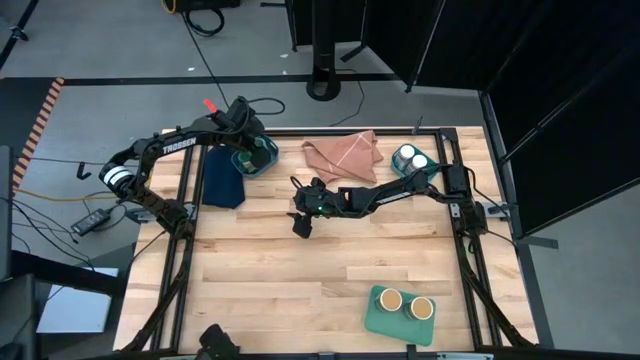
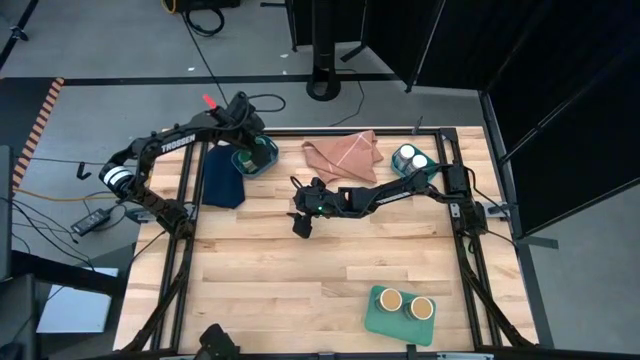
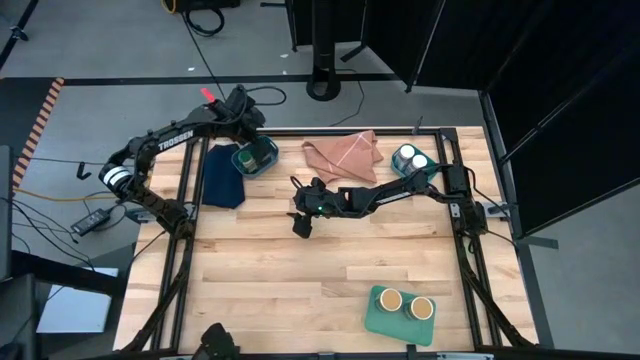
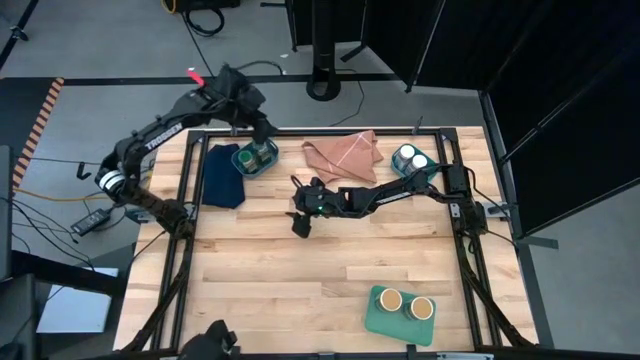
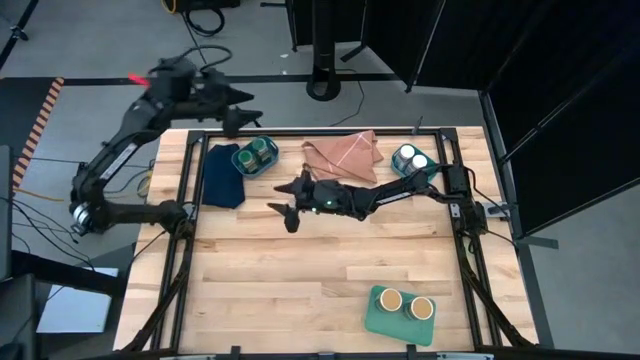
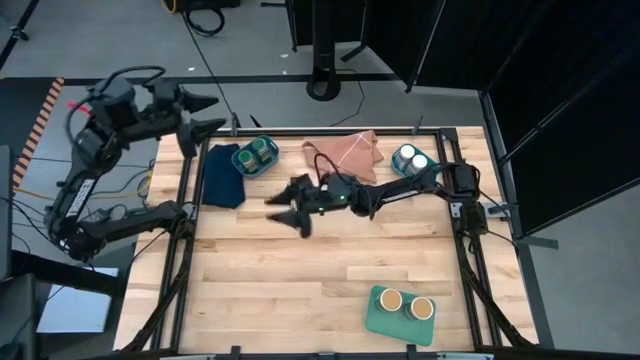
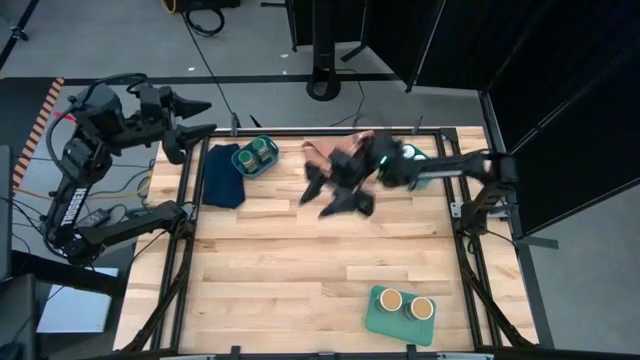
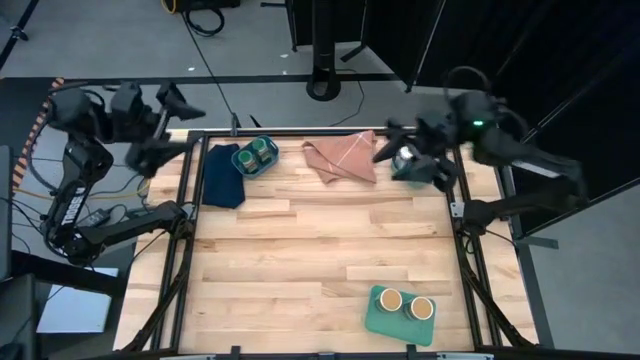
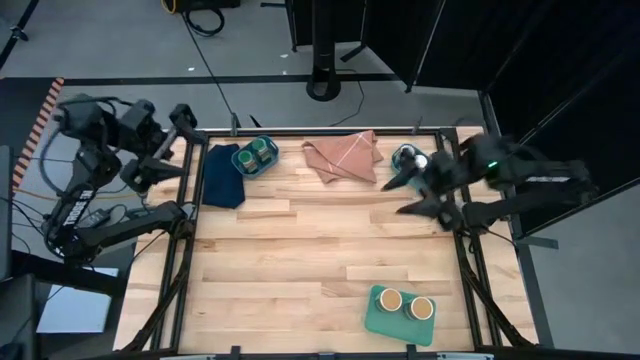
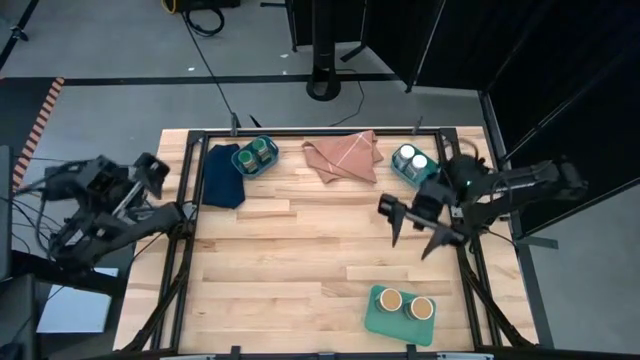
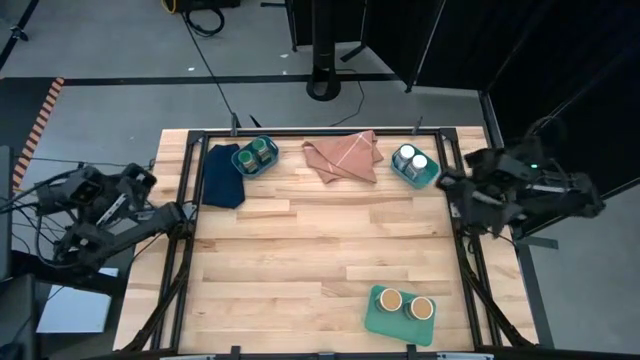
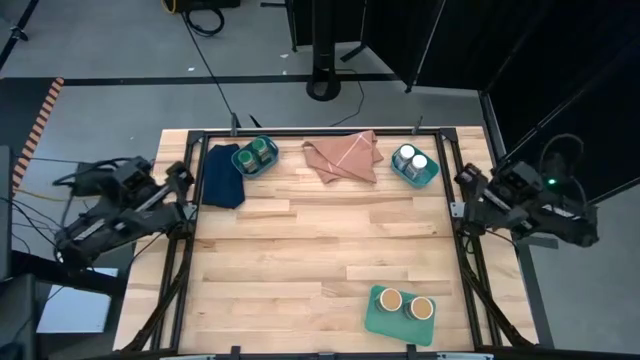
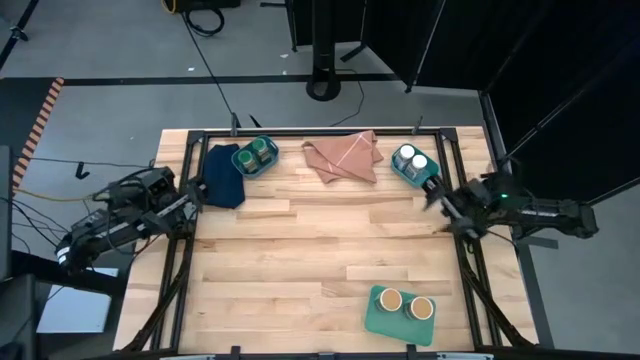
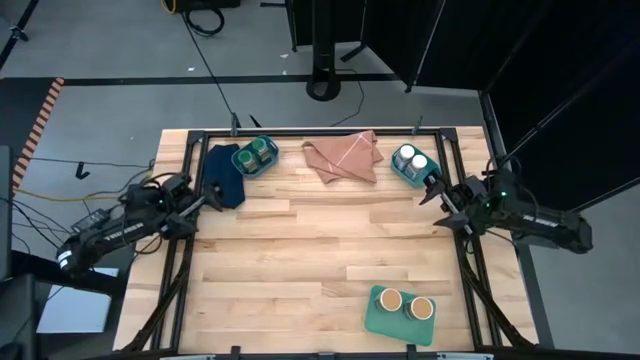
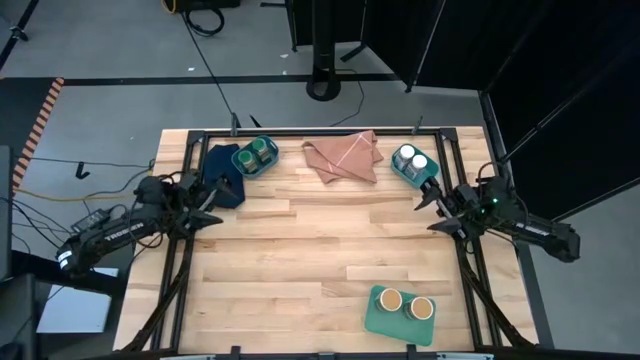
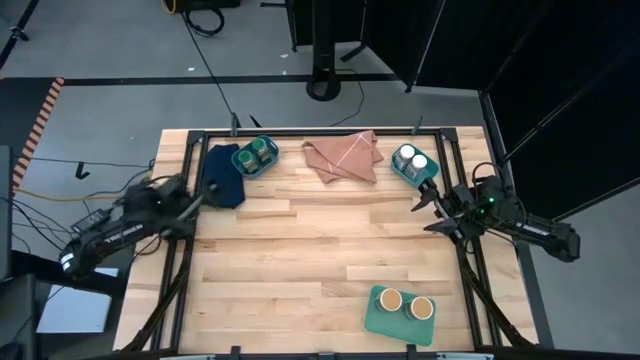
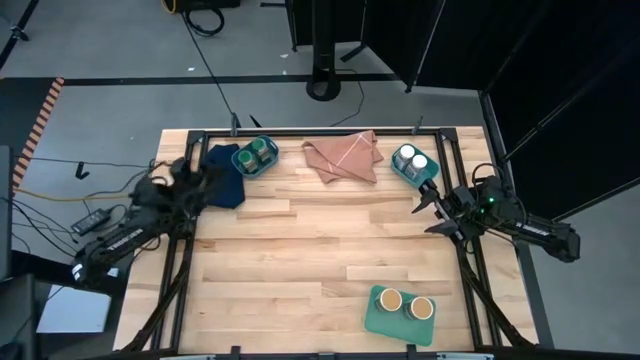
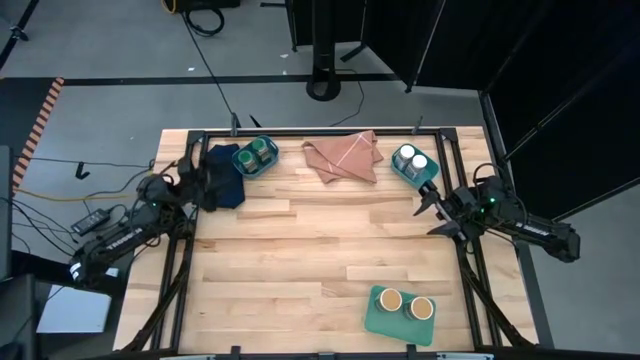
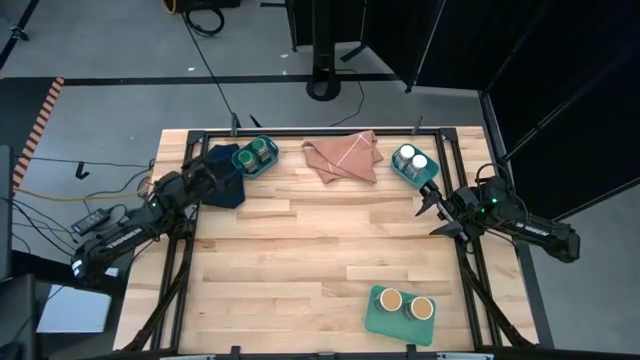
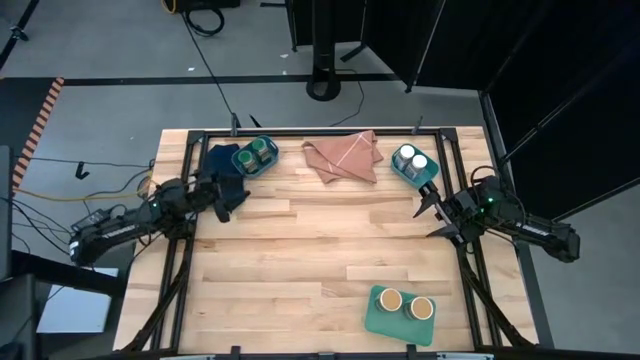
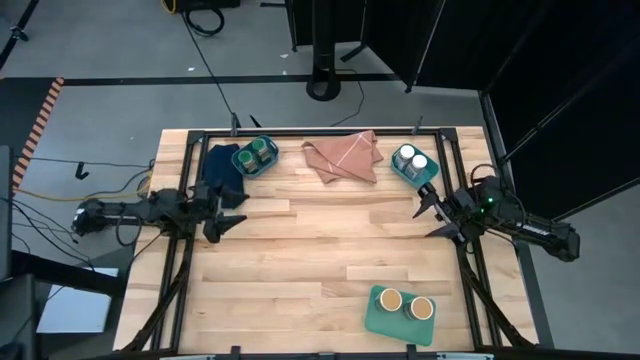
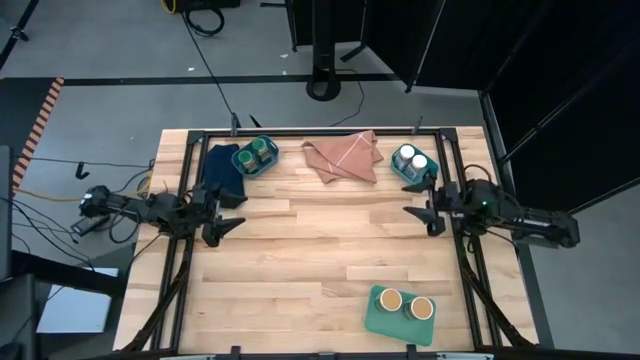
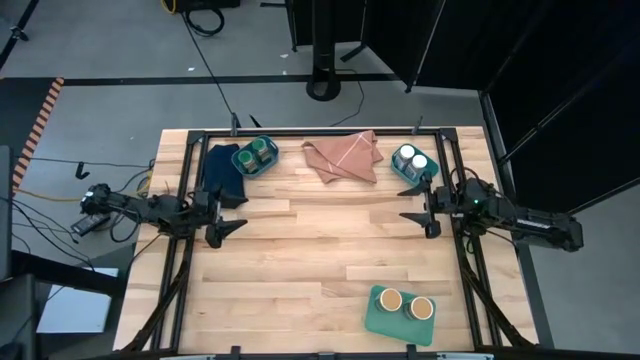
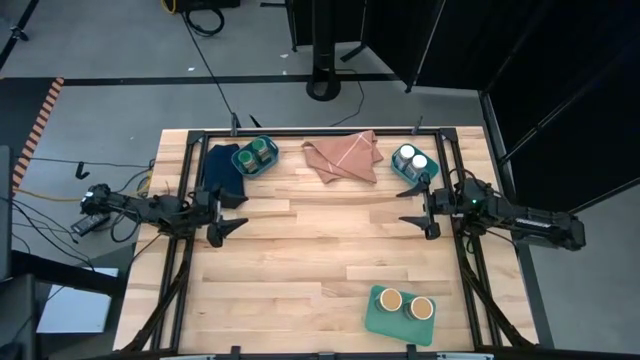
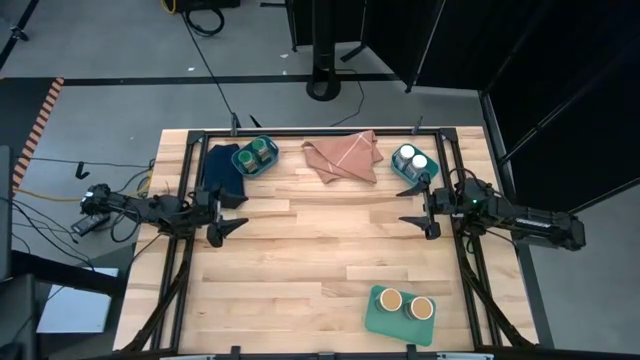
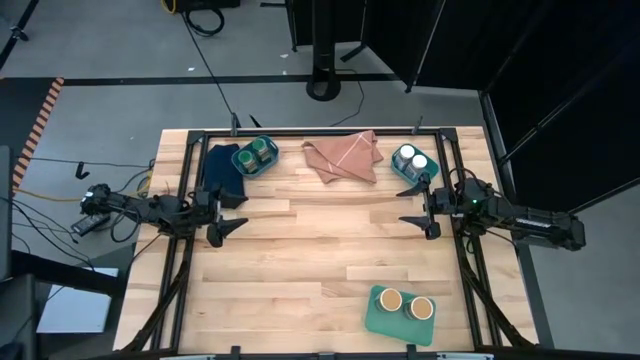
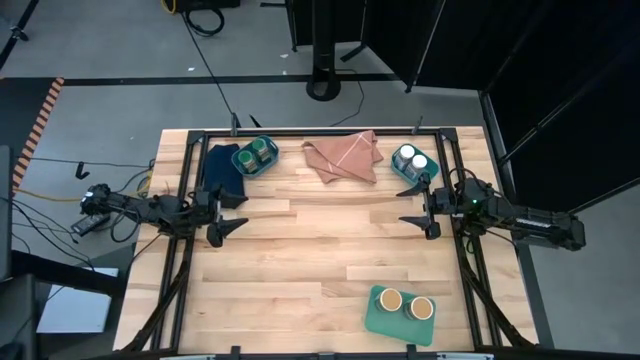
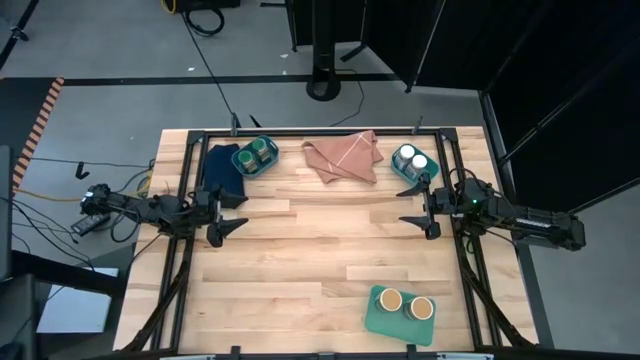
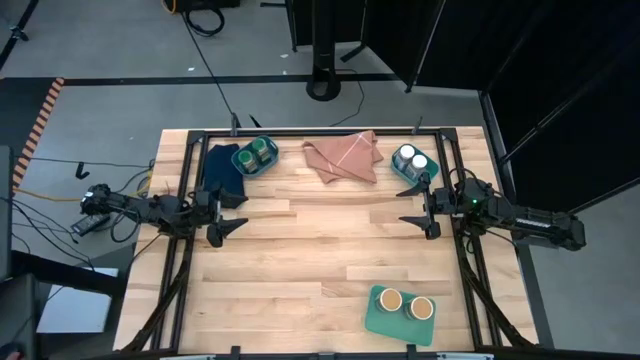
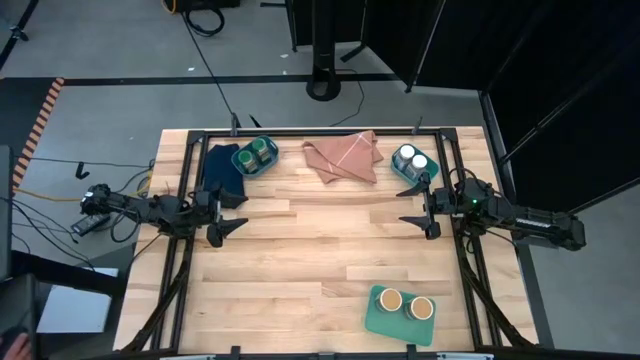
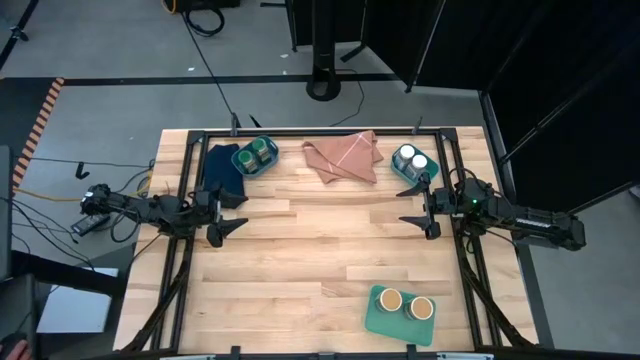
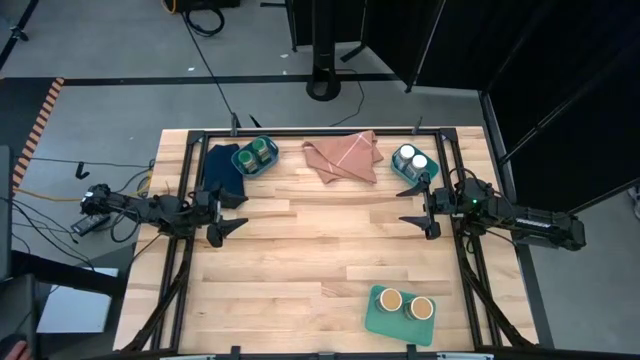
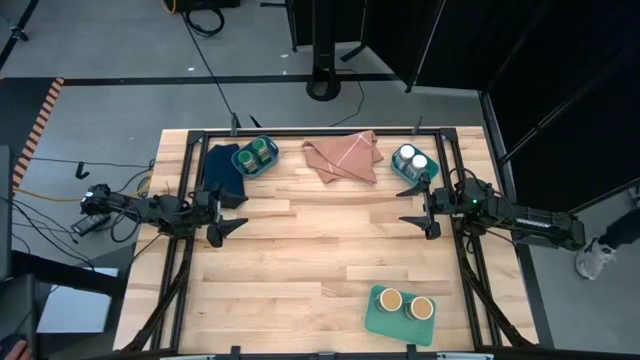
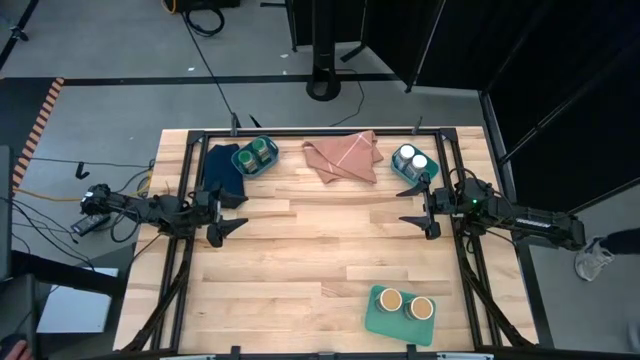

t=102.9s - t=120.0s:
Task: Sort spices by type
Return to Home Position

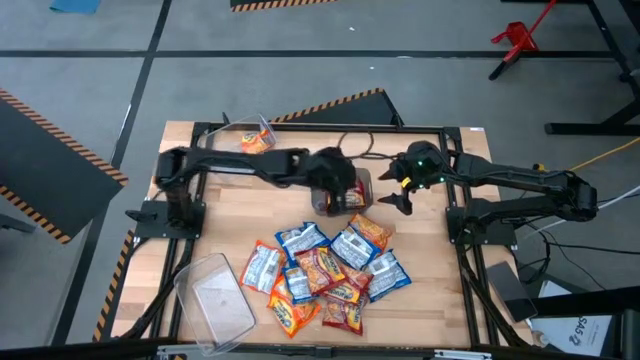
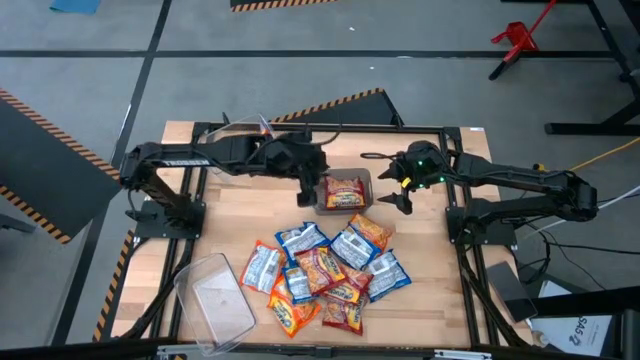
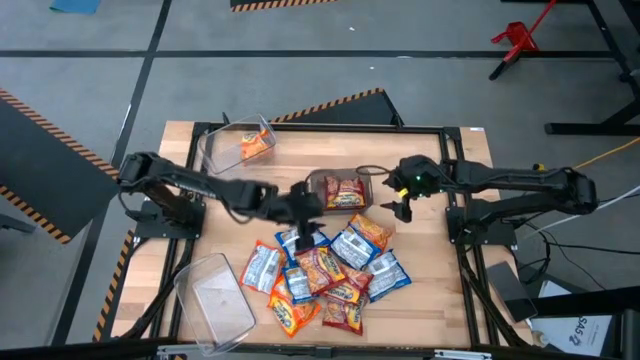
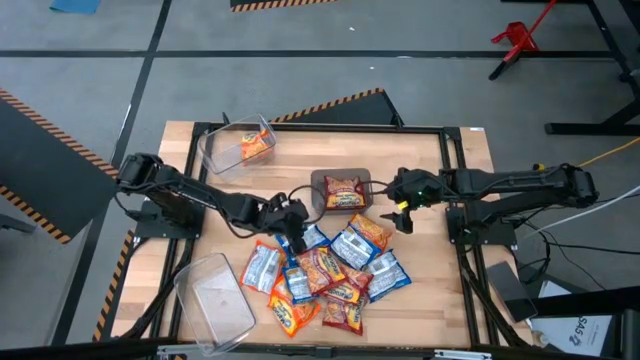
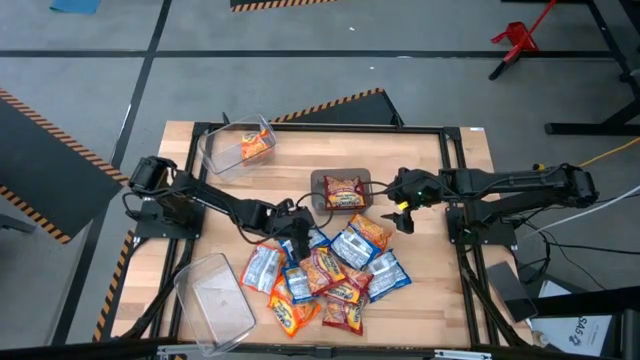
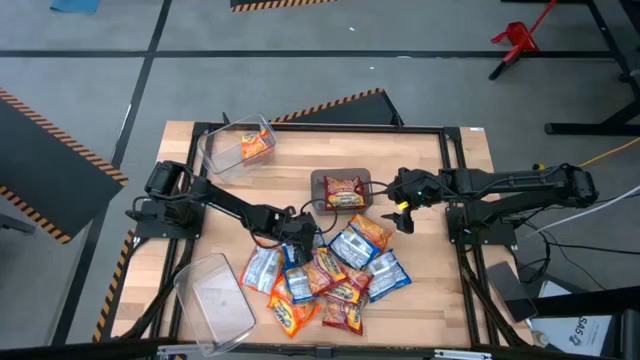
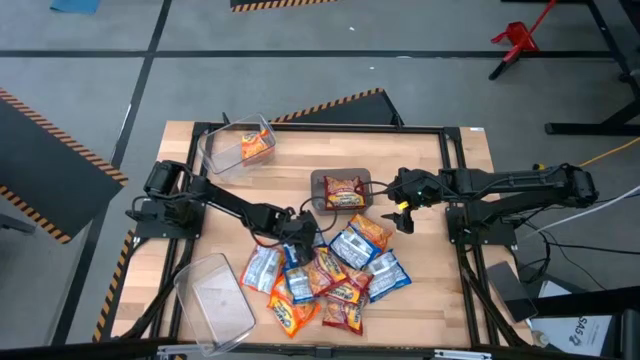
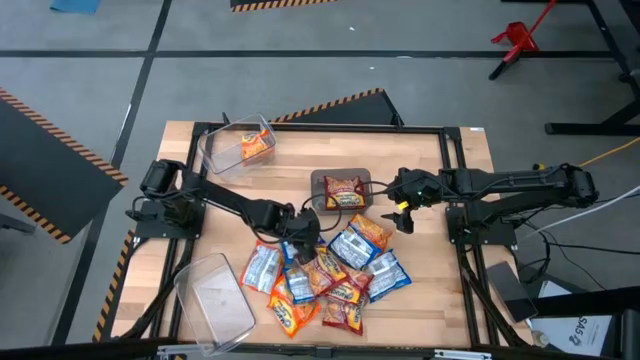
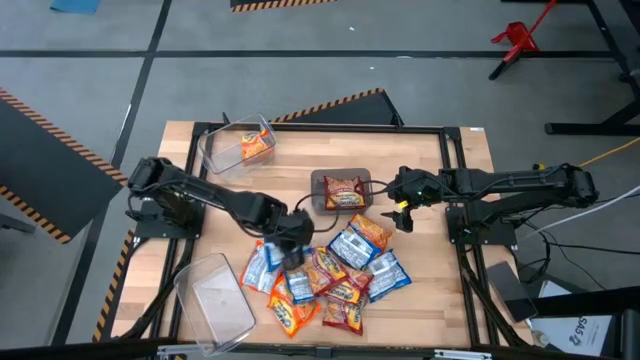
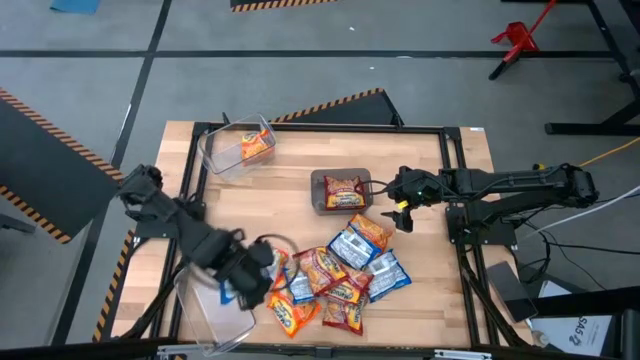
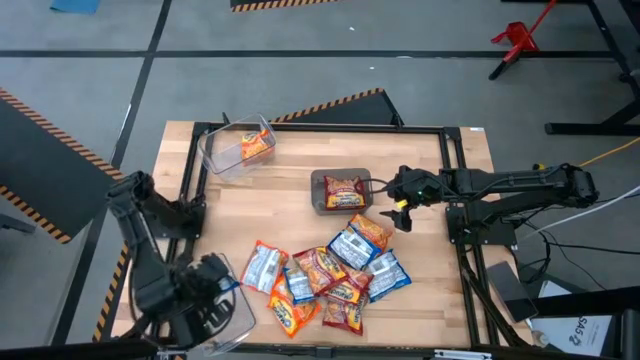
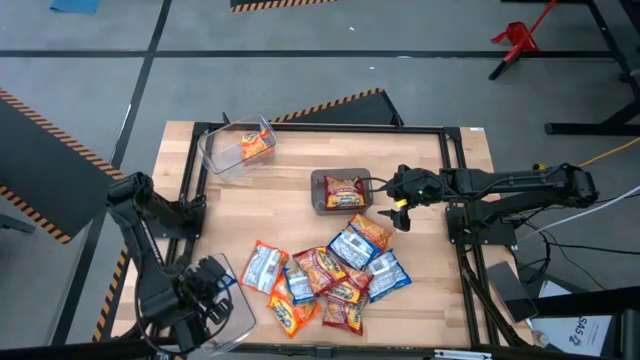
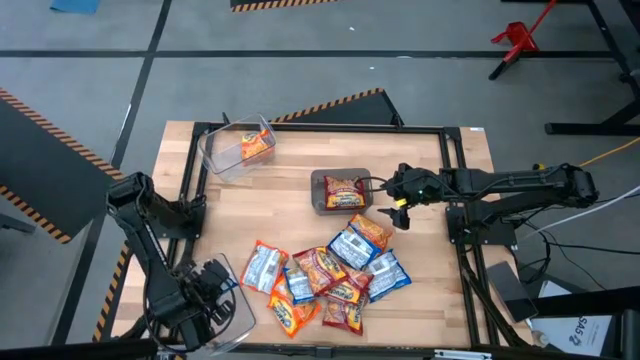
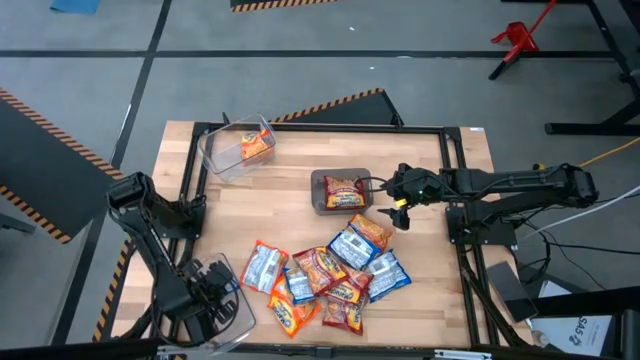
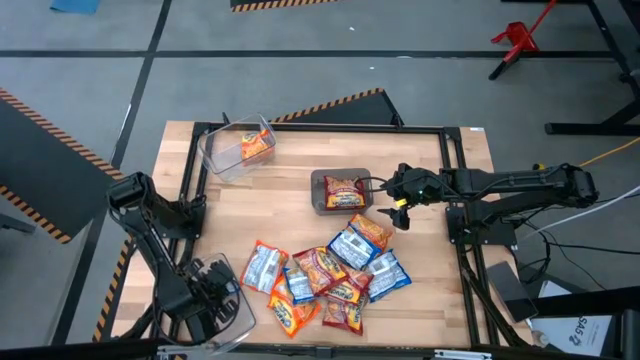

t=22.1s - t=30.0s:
Task: Sort Maruchan noodles
Put the blue noodle pack into the bottom transparent bin
